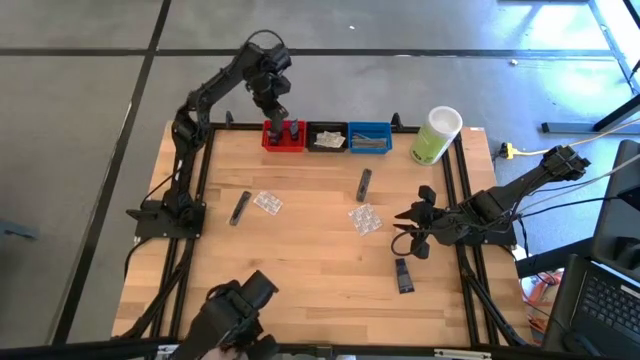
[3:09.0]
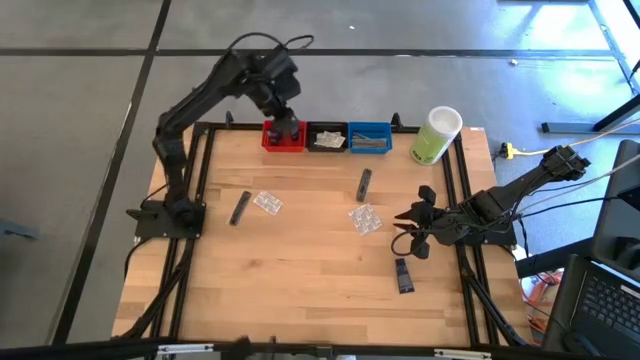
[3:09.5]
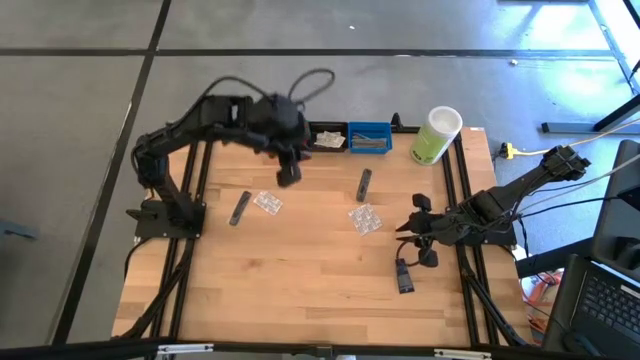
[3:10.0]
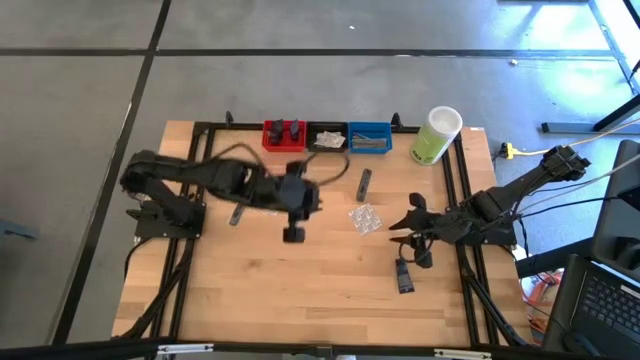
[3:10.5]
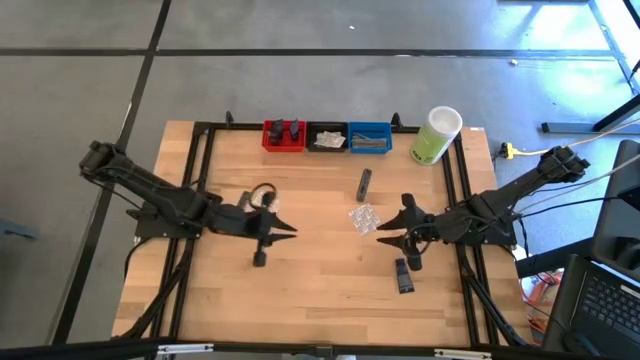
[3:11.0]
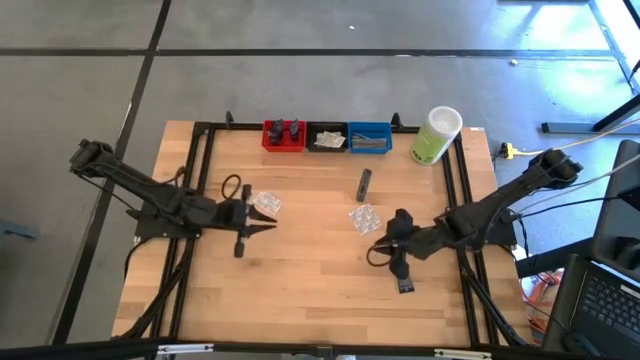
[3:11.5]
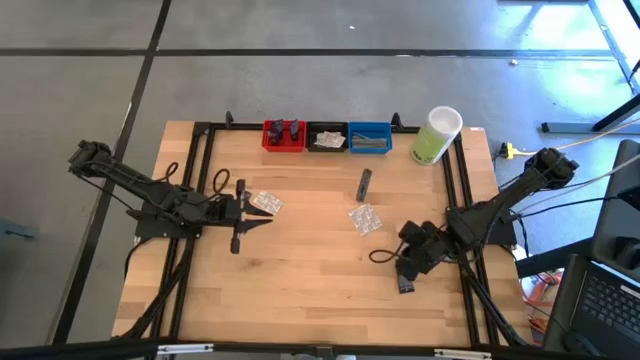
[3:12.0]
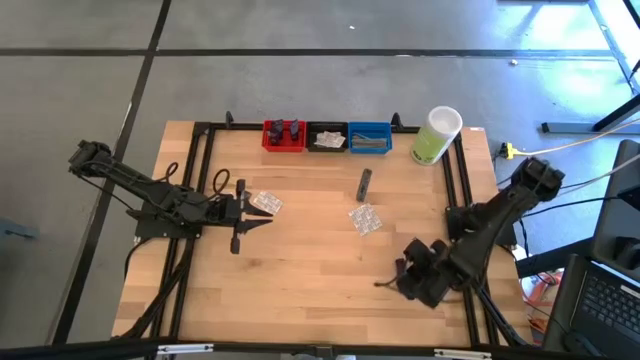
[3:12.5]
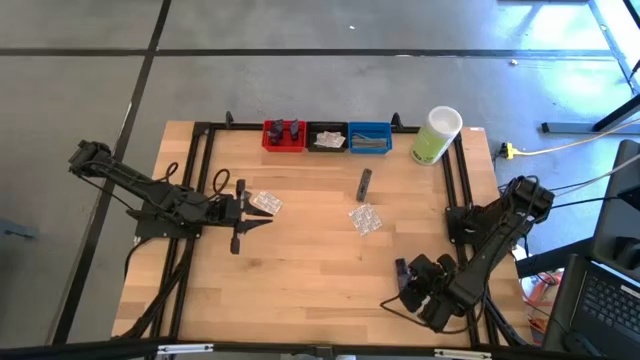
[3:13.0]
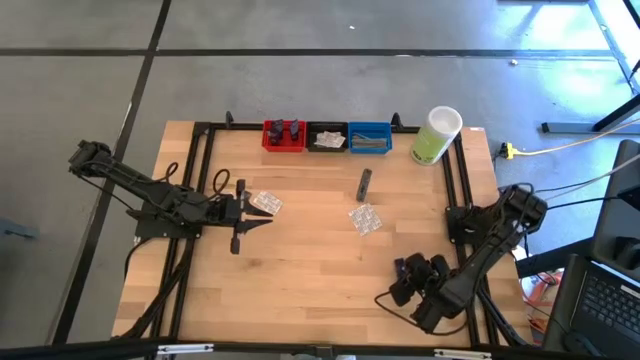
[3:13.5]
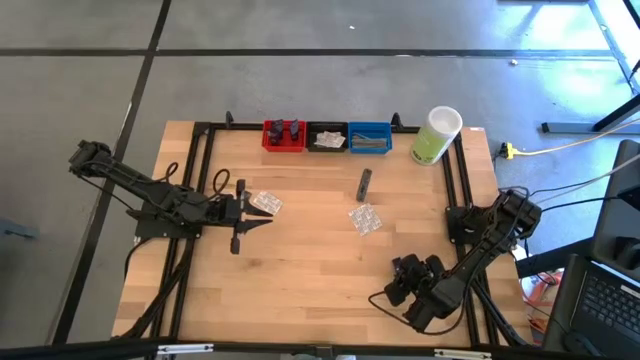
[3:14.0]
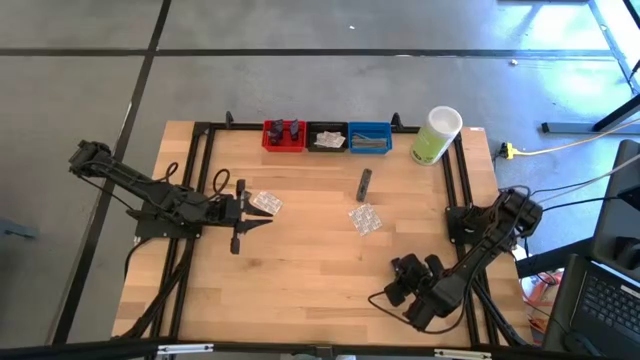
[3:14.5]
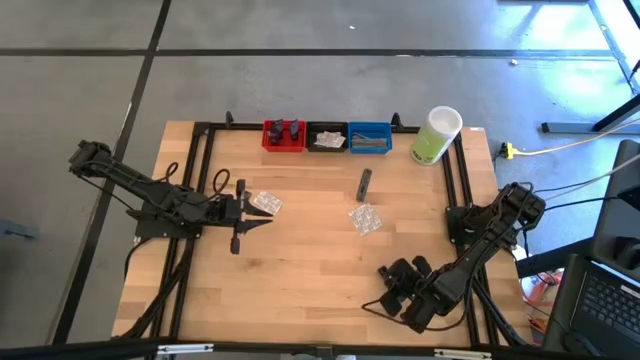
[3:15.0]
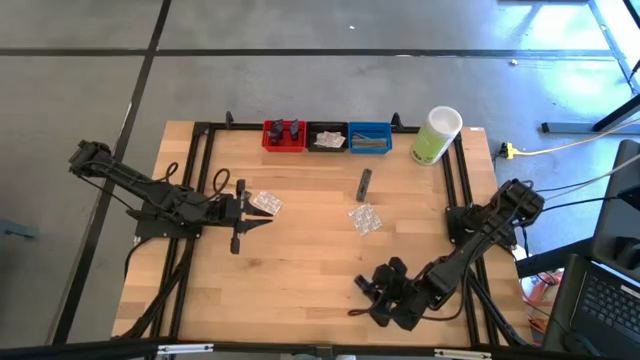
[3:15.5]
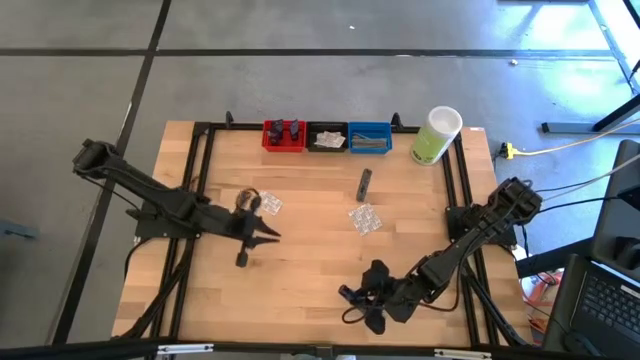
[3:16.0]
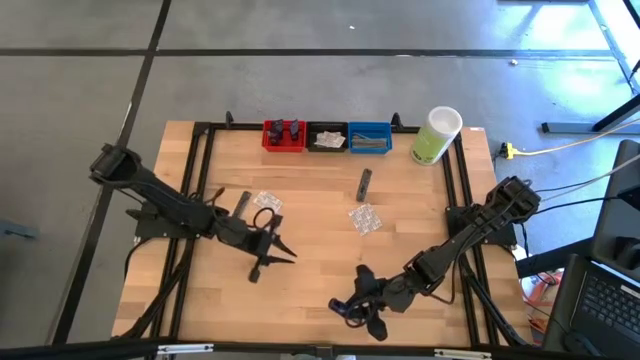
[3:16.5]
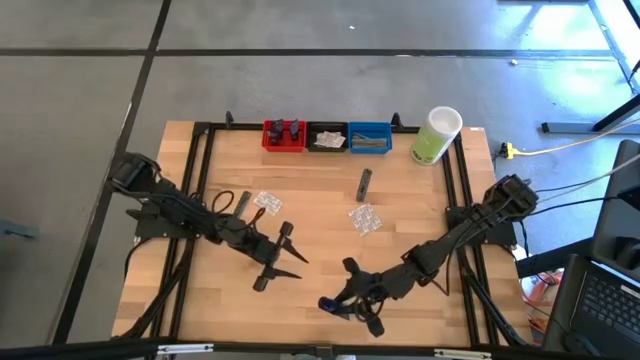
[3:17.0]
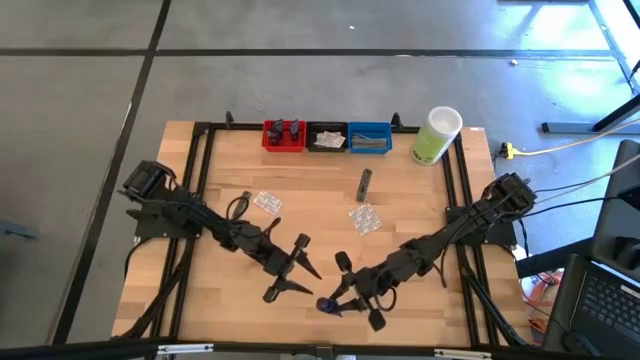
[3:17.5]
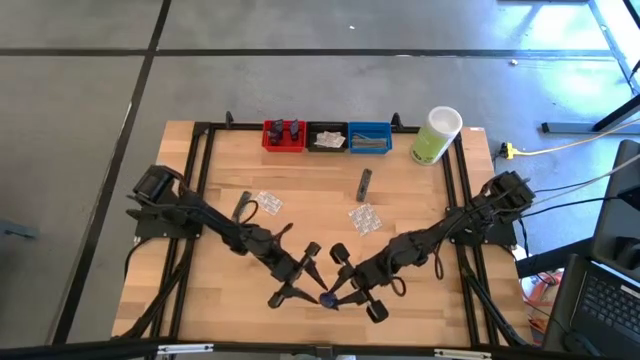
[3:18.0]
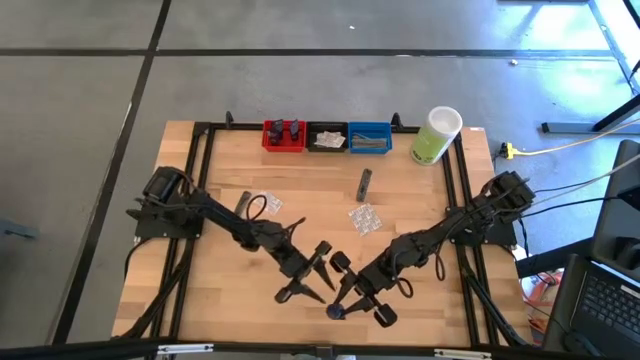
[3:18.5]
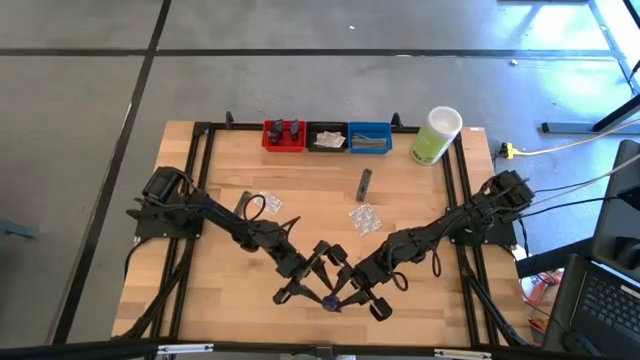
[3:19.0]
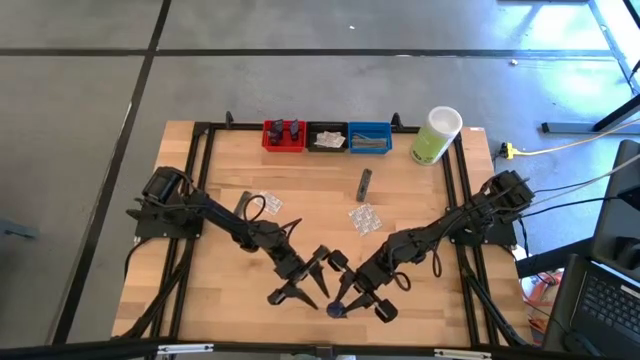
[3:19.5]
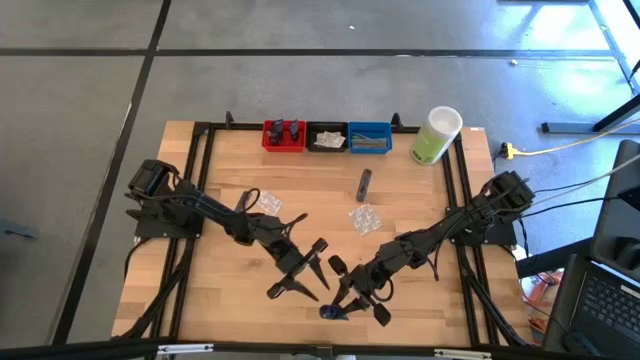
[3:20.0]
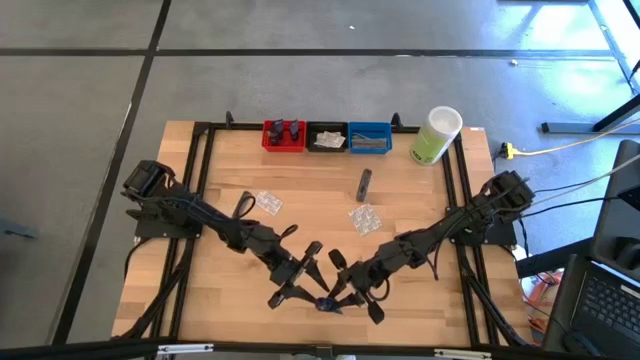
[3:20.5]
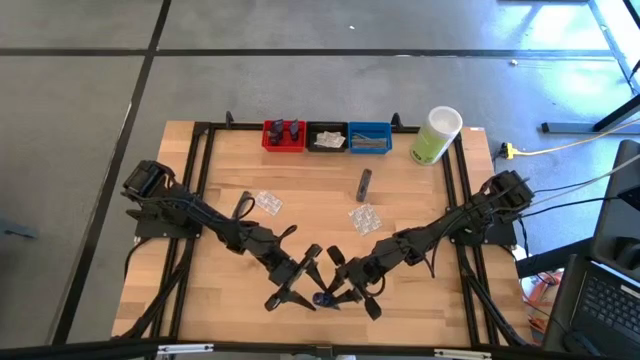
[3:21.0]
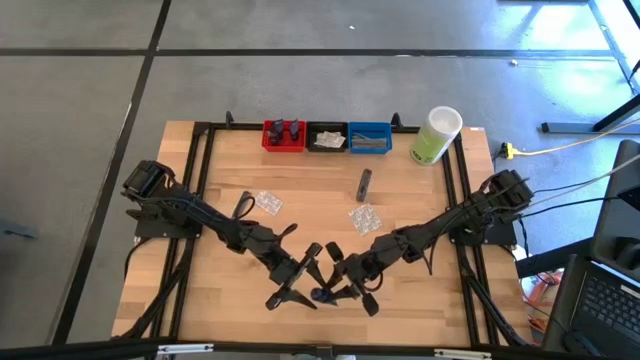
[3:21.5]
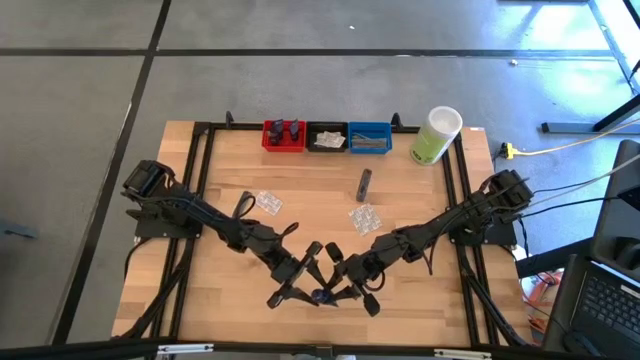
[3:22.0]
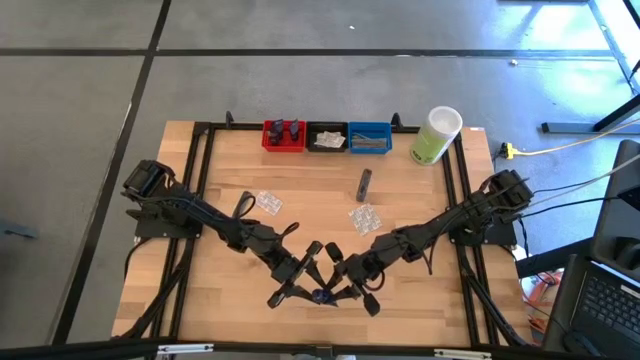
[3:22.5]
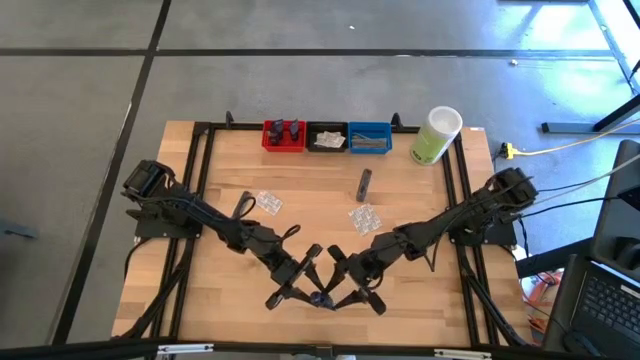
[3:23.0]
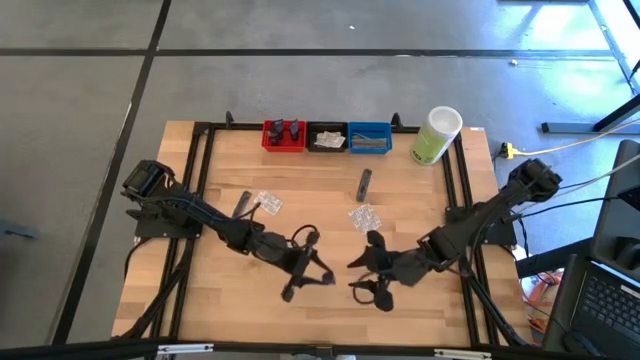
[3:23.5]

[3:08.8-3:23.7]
Task: Pick & Place Travel size toiletries
Put the blue shave cream into the red bin

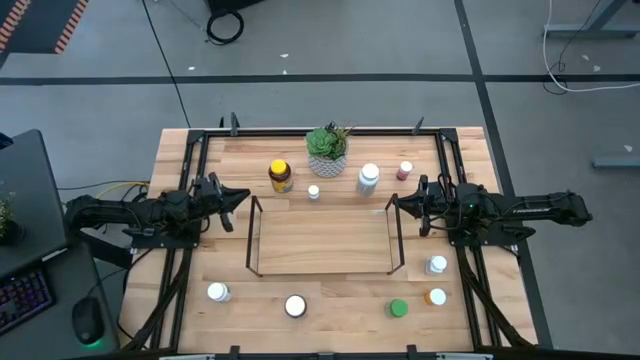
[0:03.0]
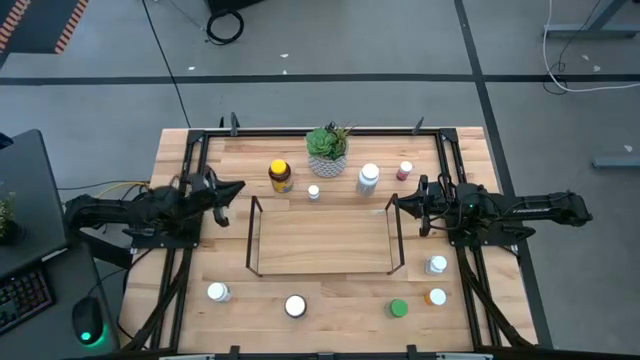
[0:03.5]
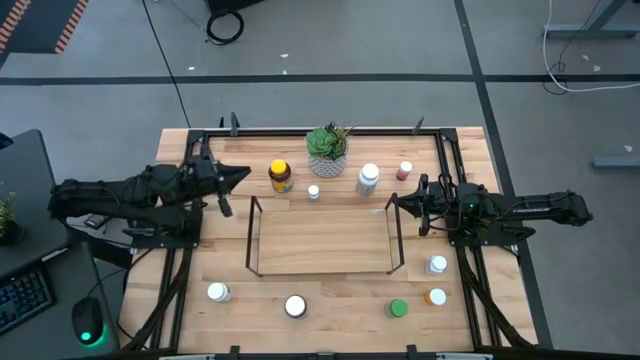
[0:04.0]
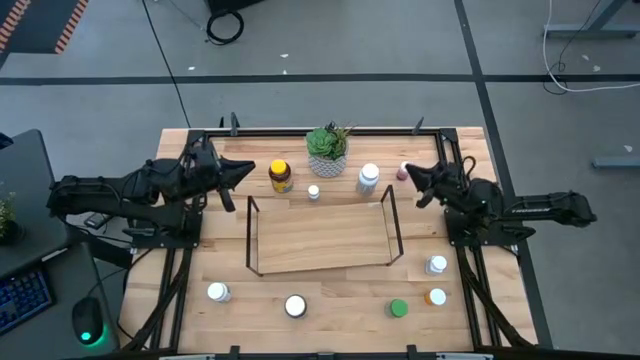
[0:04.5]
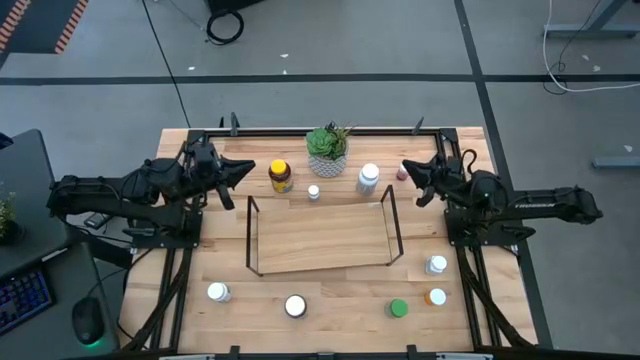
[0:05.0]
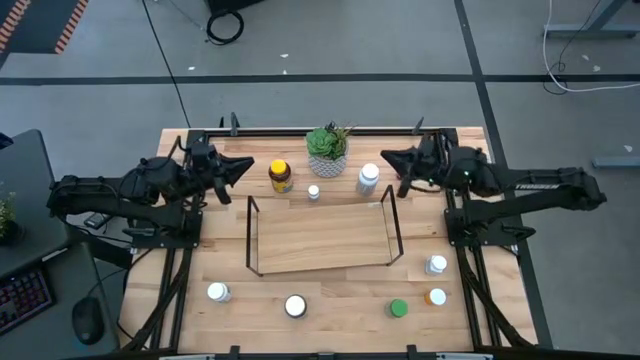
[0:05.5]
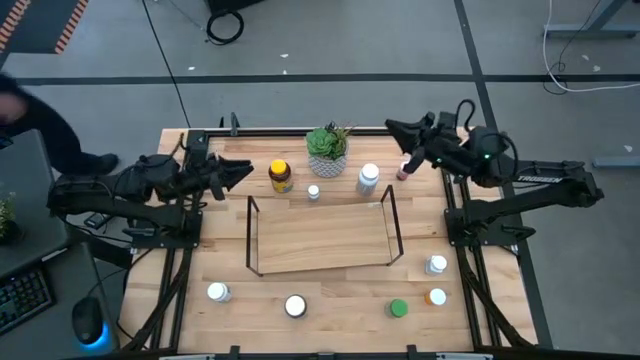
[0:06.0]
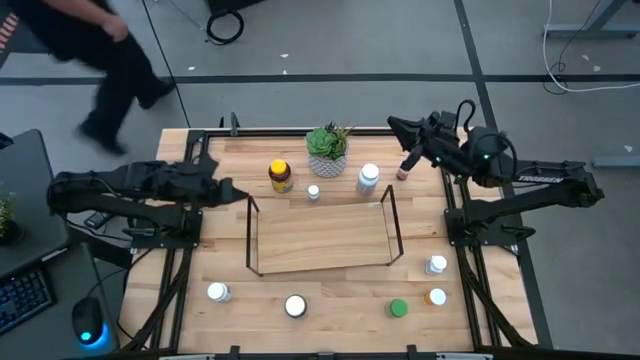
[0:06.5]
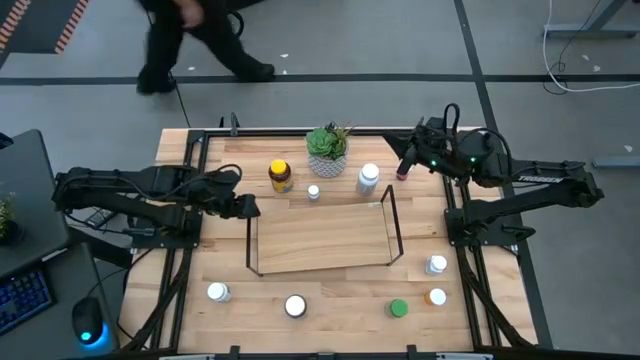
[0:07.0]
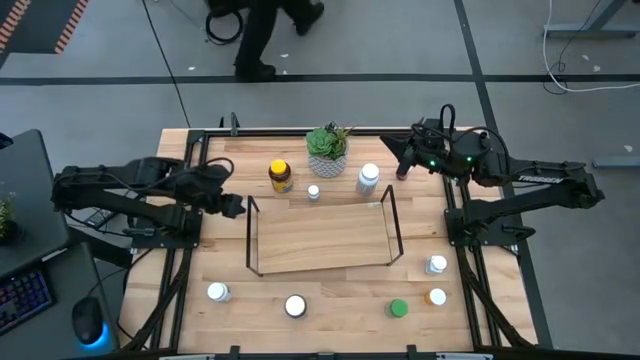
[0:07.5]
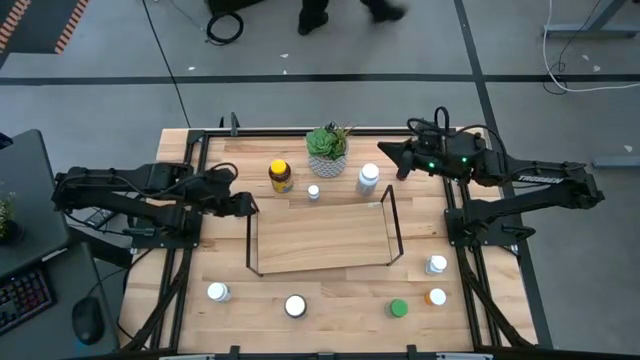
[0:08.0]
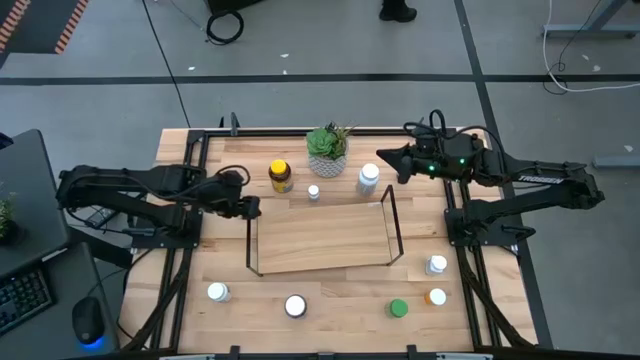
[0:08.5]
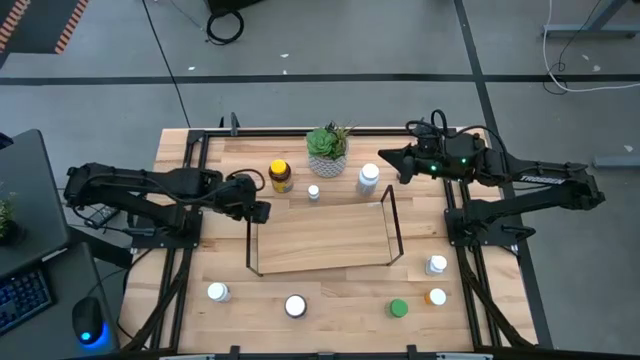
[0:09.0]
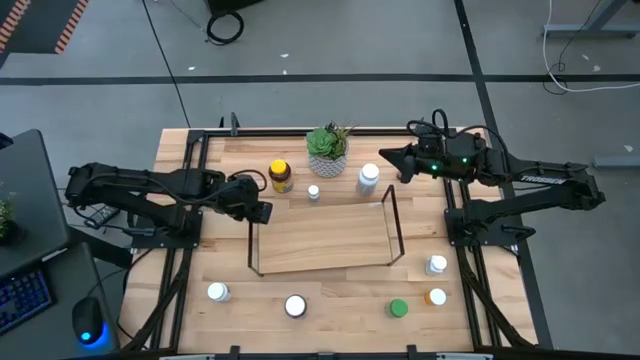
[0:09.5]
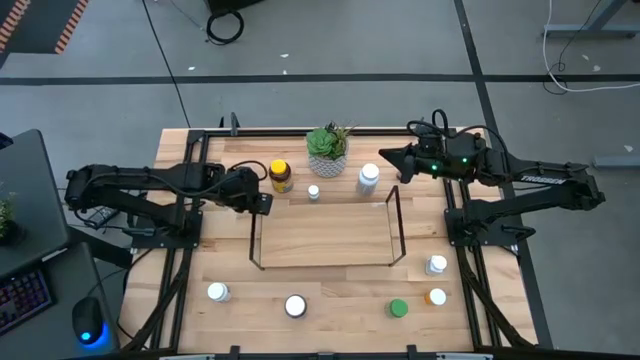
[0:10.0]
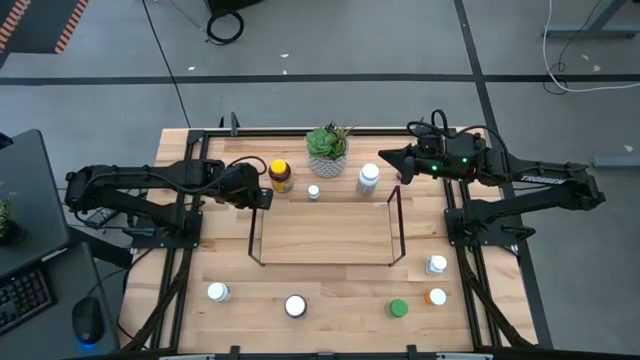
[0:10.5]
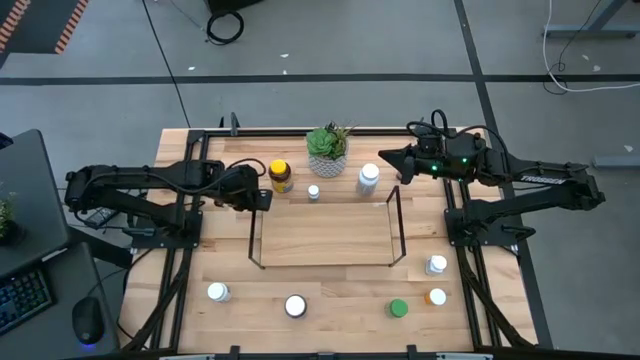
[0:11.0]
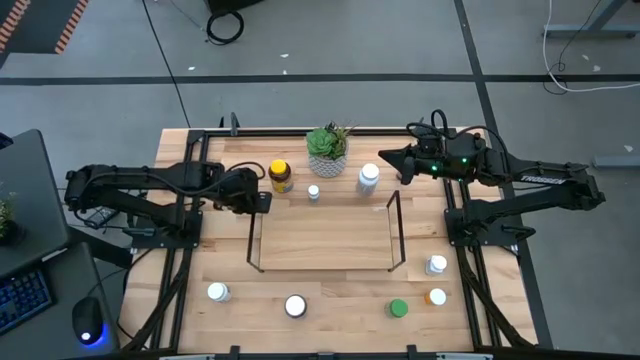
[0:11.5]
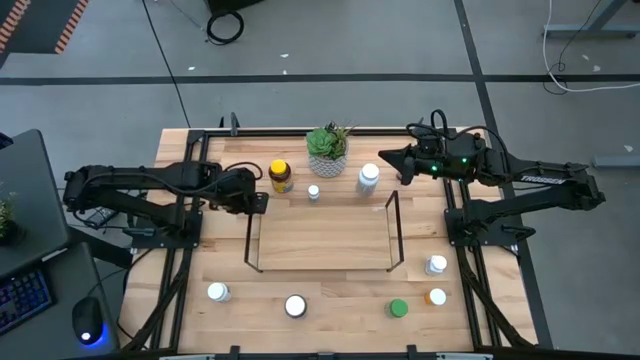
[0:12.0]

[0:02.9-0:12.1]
Task: Pick and place medicine bottles onto shelf by color
Prepare the shelf
